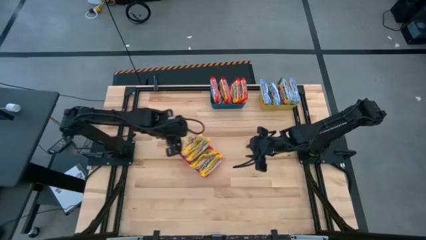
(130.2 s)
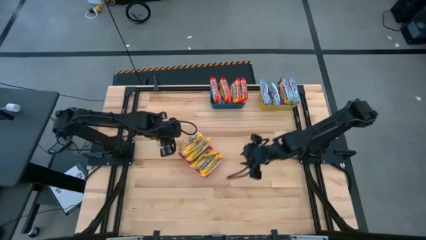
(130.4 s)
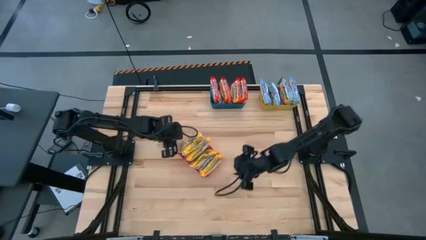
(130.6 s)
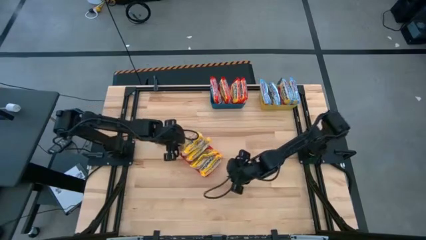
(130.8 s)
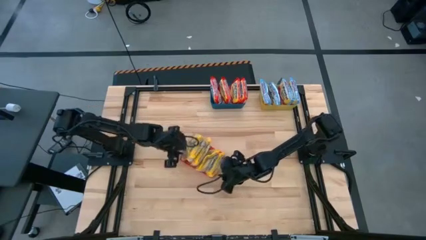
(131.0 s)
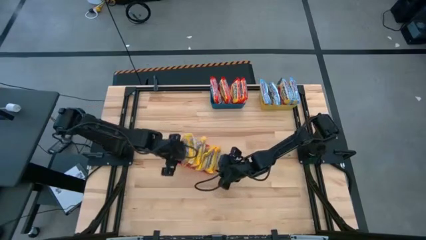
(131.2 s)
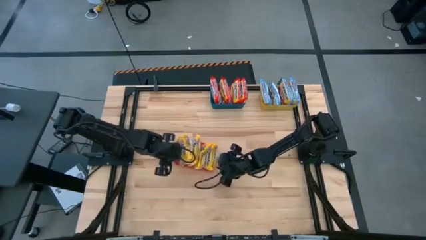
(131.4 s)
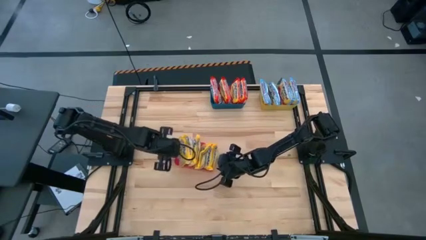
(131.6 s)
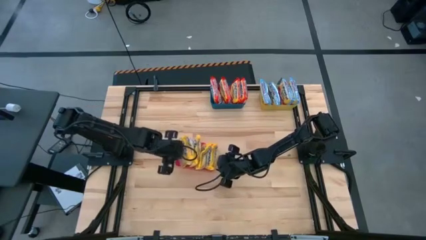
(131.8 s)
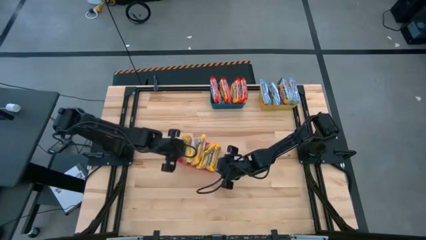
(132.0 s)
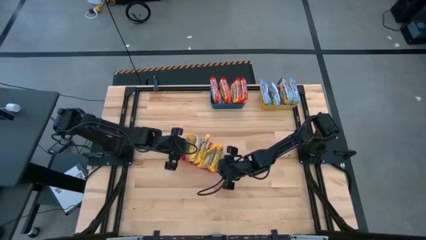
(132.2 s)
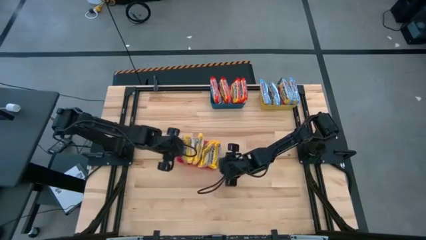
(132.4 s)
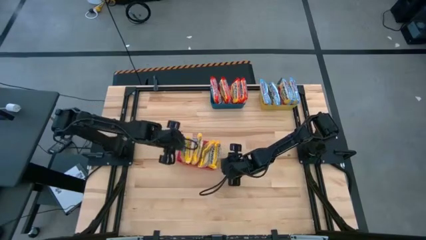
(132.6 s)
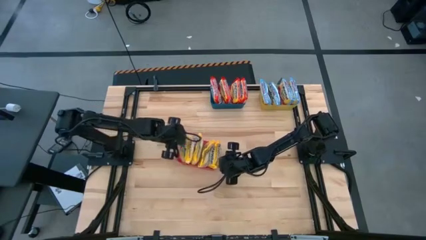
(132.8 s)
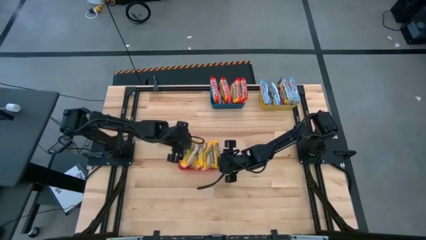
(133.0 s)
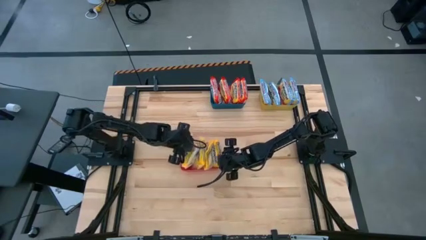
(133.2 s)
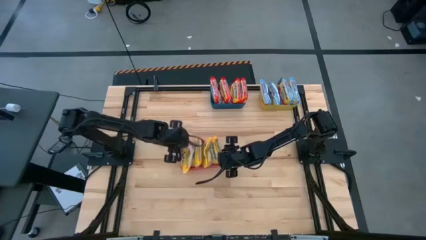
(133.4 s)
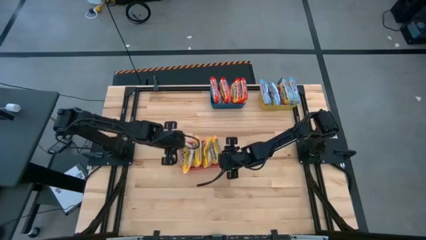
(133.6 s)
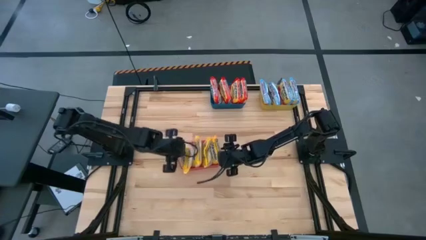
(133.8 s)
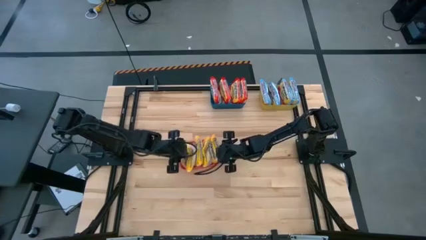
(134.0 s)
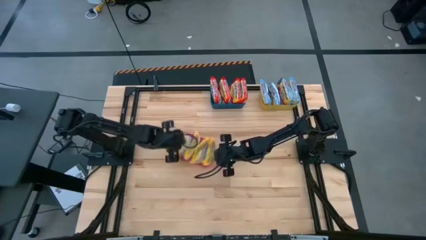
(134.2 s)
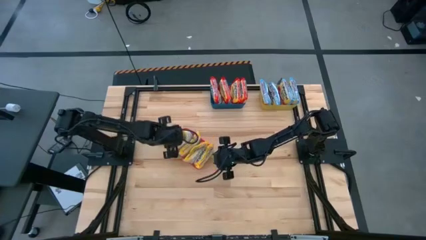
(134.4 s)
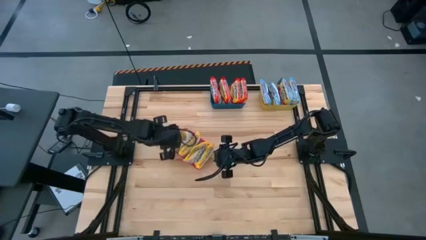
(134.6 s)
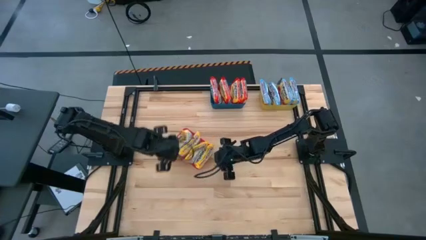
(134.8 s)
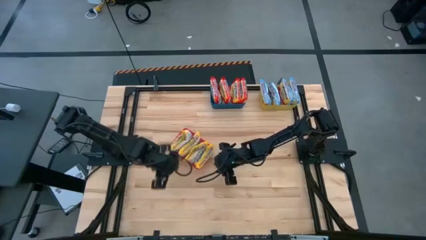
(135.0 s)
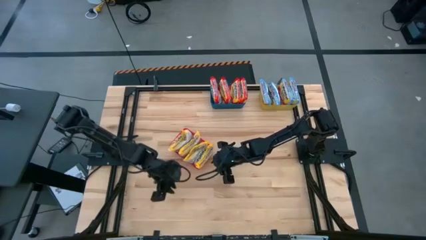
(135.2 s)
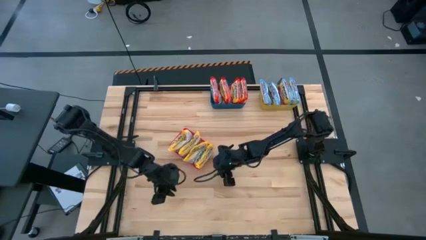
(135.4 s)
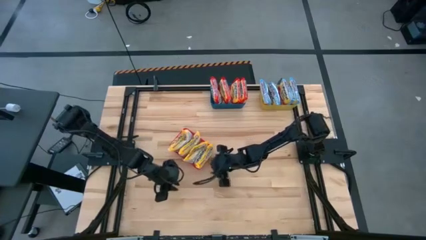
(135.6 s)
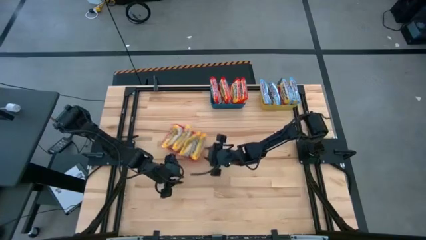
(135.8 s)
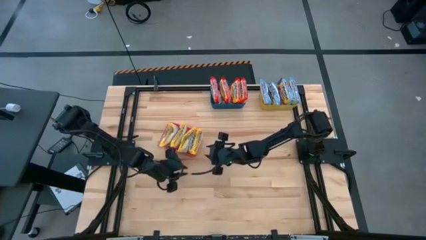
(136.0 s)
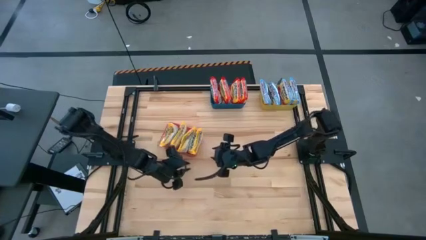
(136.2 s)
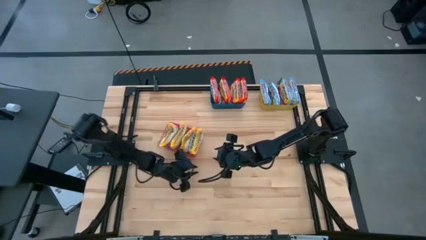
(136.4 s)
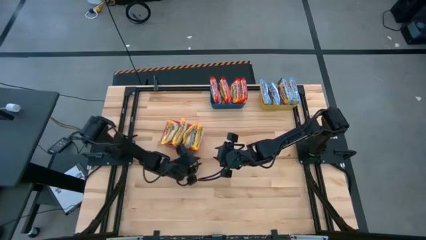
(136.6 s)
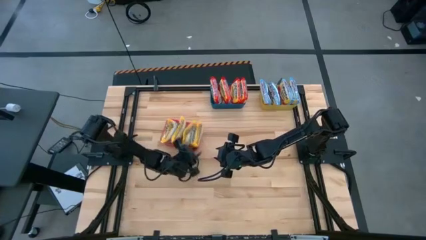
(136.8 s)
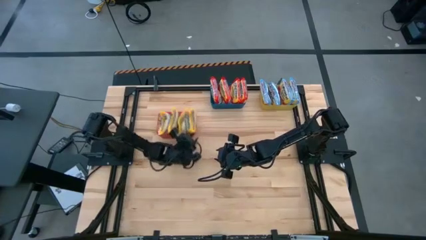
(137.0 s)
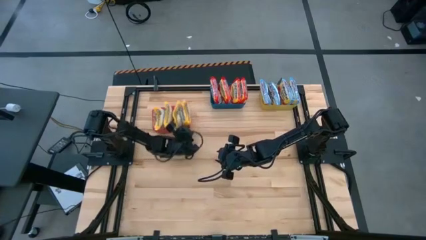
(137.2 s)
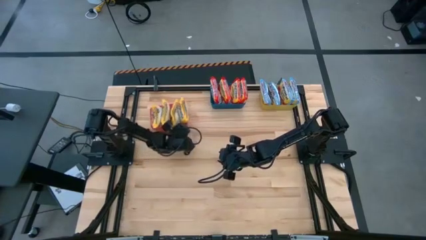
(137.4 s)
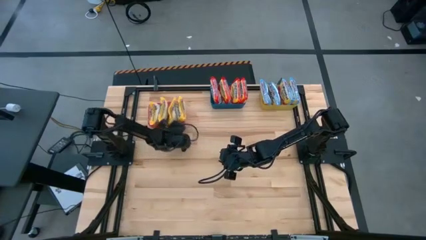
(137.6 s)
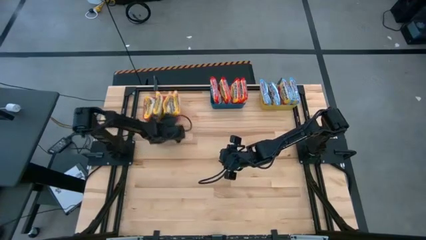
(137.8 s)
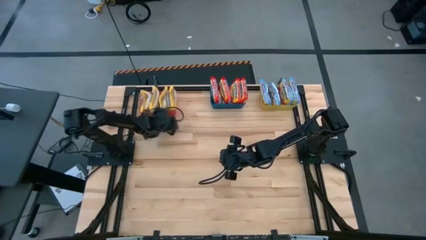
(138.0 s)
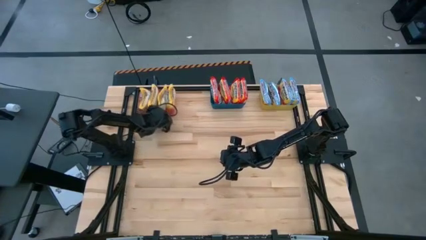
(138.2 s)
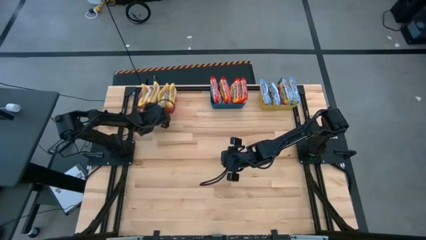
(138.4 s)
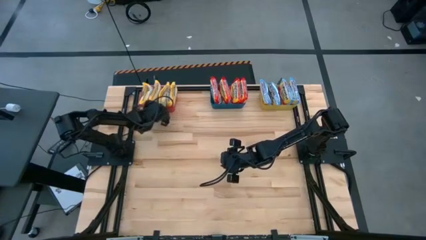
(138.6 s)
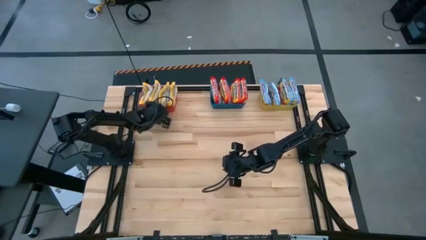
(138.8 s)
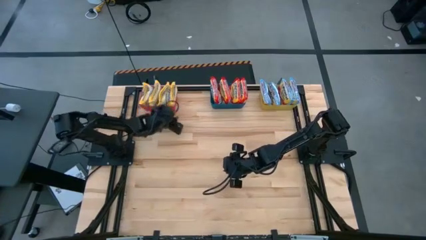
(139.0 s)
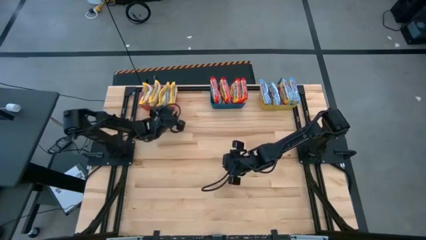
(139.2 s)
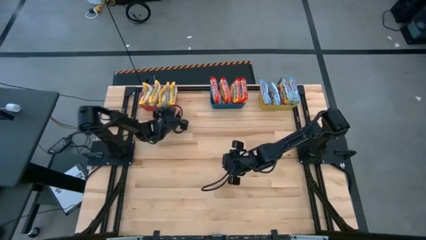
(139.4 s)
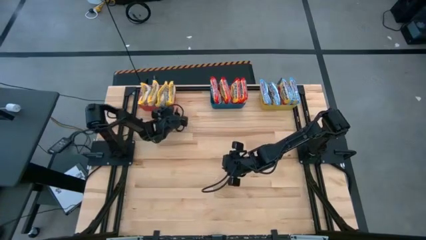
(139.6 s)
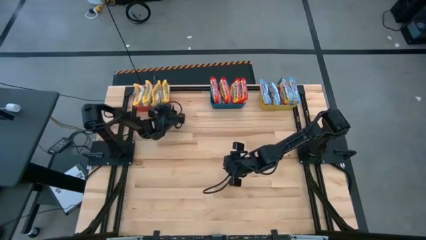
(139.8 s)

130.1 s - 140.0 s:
Task: Sort Maruchan noodles
Move the red bin to the top left of the table

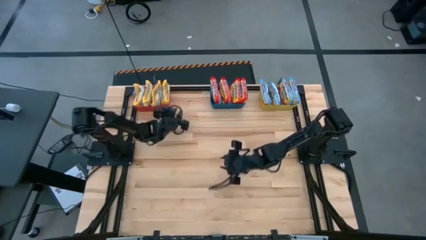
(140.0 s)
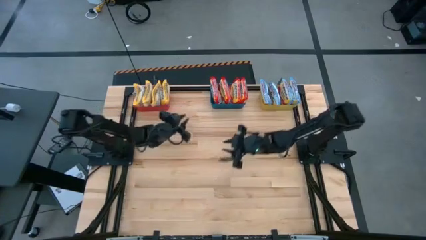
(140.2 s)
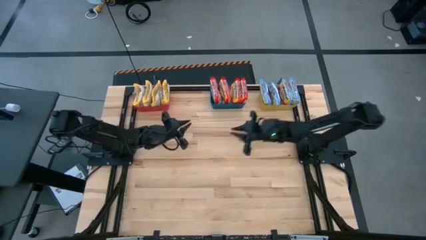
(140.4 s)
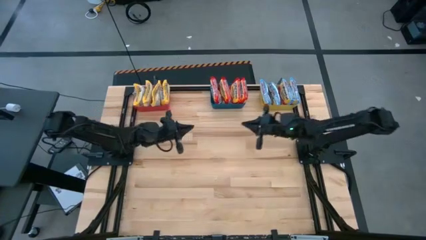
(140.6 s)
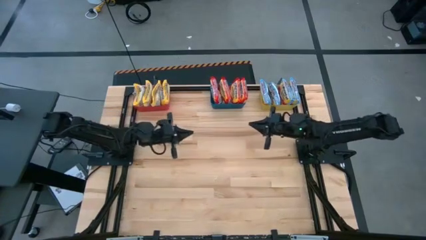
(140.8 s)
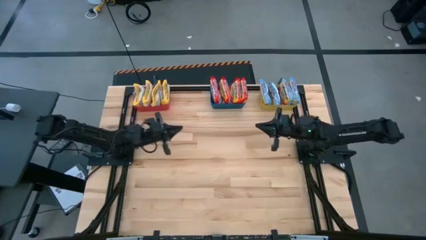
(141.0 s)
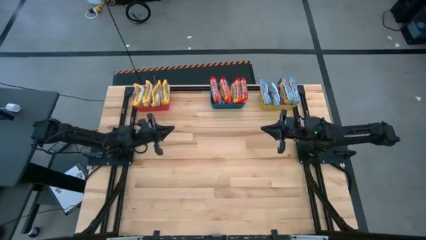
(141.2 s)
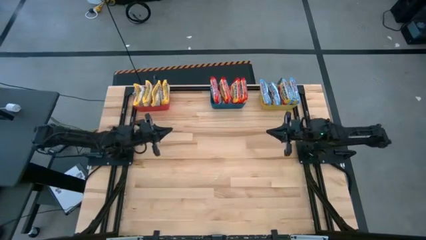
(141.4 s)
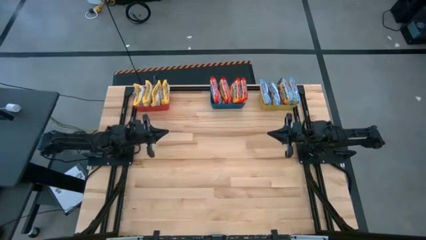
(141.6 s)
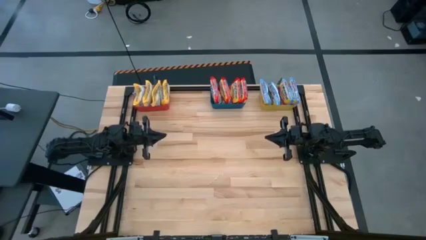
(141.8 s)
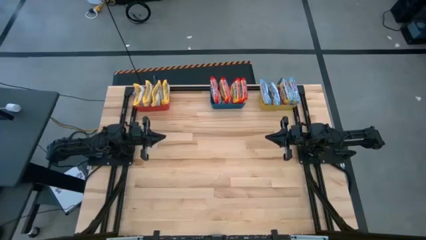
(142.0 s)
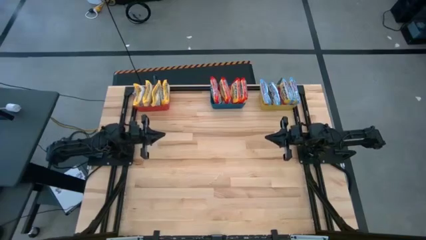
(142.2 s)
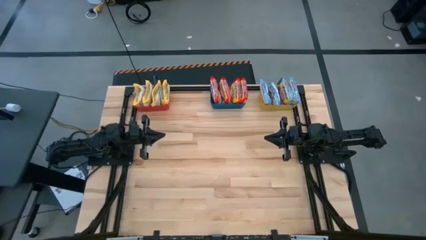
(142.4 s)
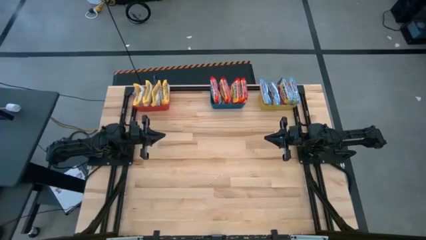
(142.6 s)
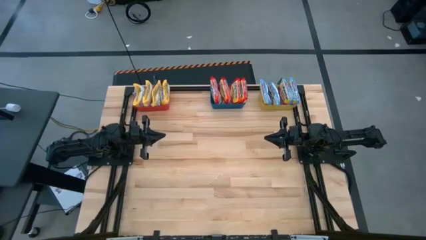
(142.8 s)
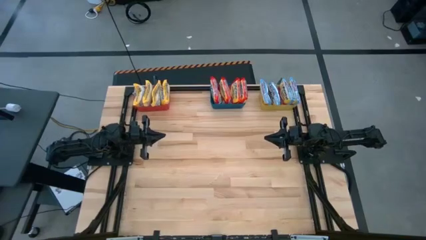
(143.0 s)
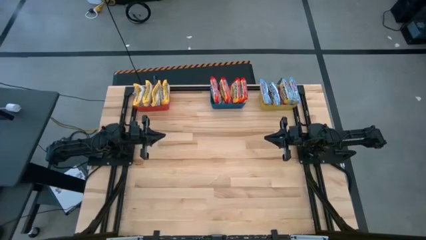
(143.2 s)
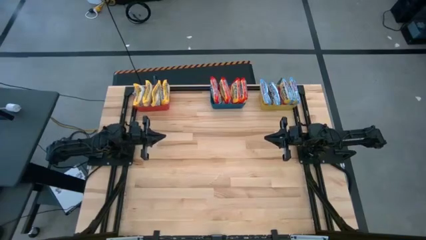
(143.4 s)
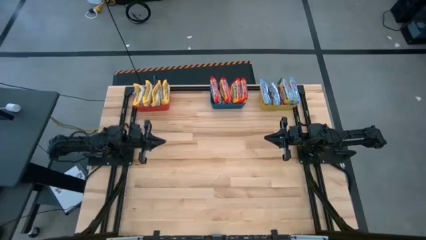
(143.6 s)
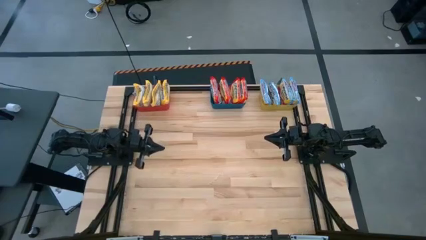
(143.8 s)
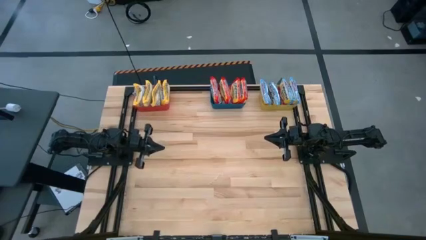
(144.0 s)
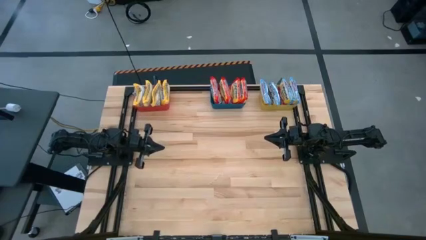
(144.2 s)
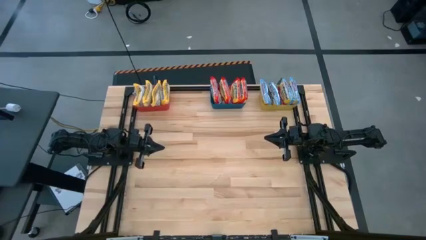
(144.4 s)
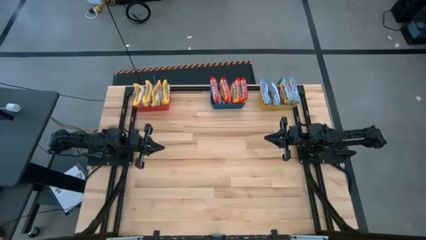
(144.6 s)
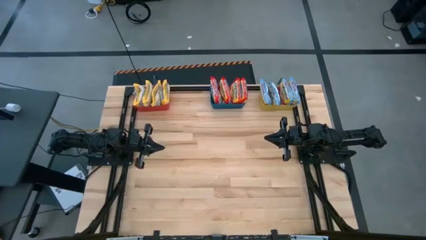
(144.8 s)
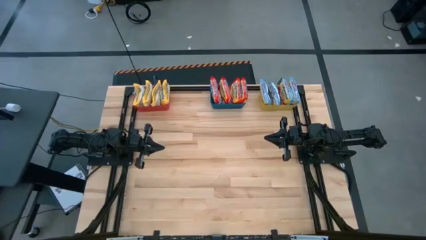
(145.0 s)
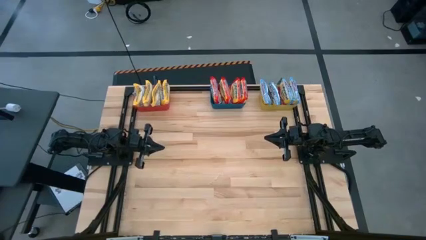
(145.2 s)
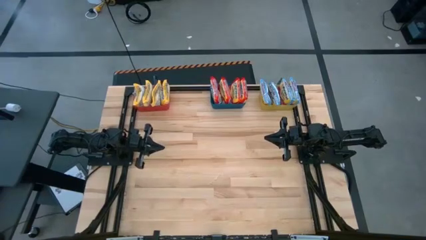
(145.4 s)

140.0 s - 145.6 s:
Return to Home Position

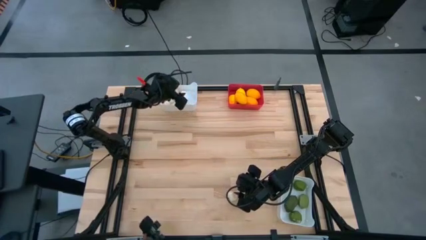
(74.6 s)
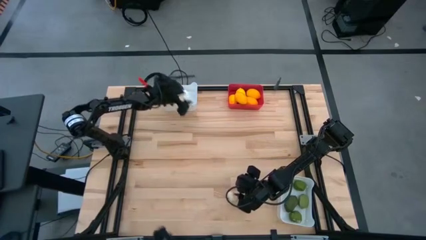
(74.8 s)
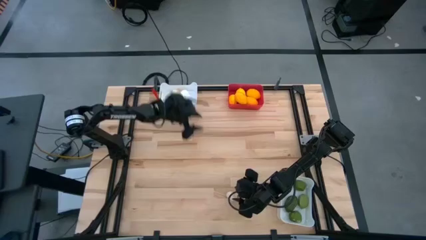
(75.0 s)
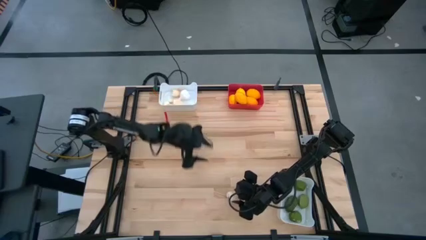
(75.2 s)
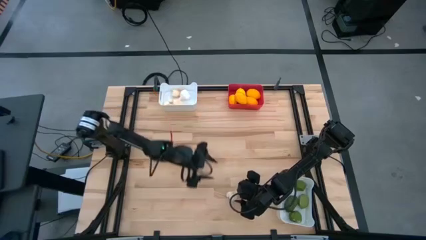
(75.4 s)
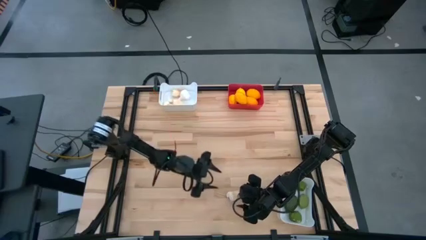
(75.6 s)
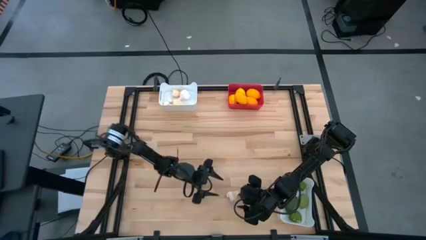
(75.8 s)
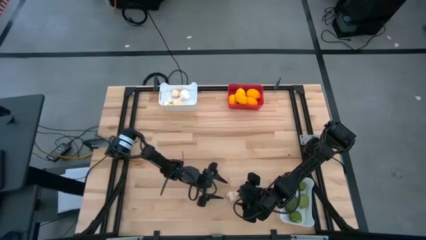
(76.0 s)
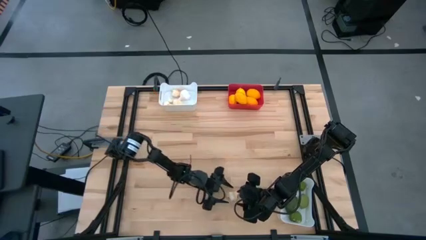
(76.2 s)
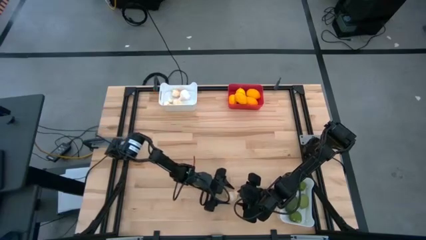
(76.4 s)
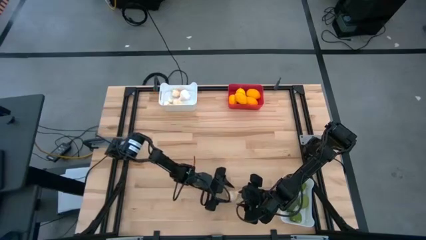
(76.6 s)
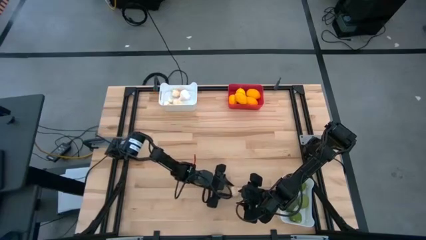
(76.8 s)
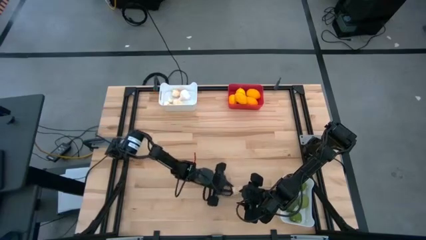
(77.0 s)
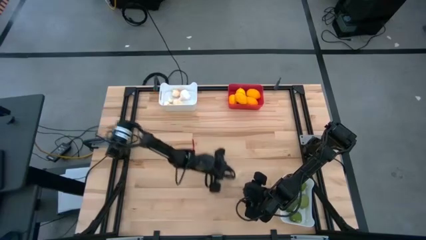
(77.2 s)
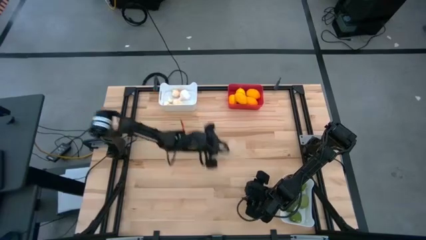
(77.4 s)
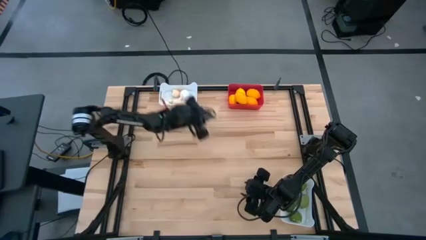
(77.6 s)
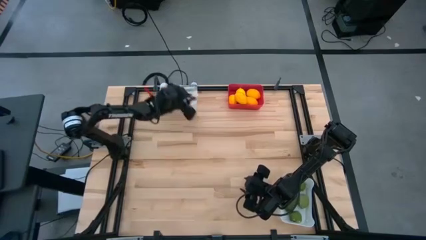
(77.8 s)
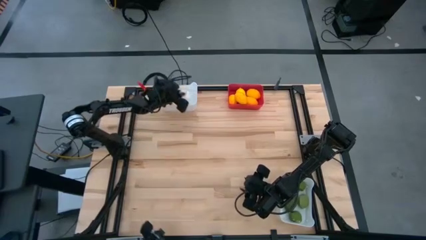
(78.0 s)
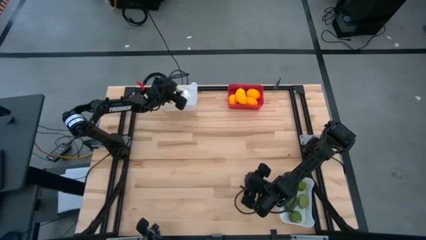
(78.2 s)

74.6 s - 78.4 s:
Task: Sort produce into baskets
Put the white garlic into the top white bin
